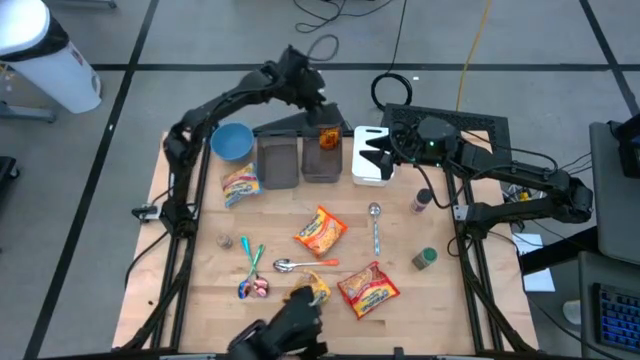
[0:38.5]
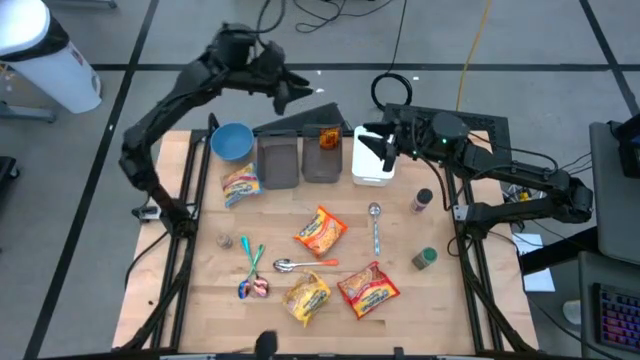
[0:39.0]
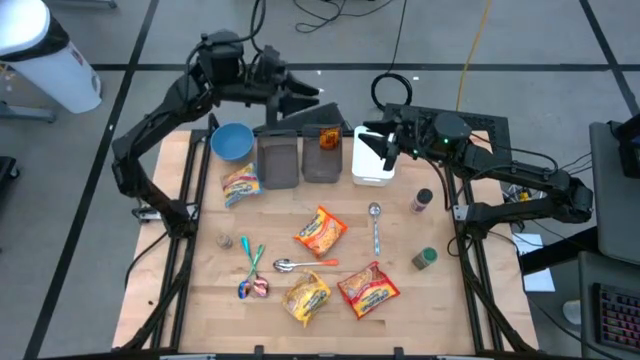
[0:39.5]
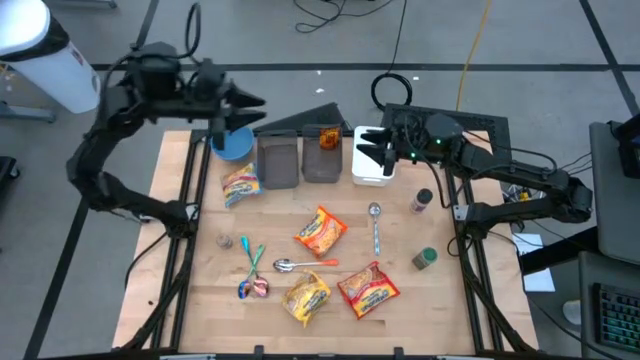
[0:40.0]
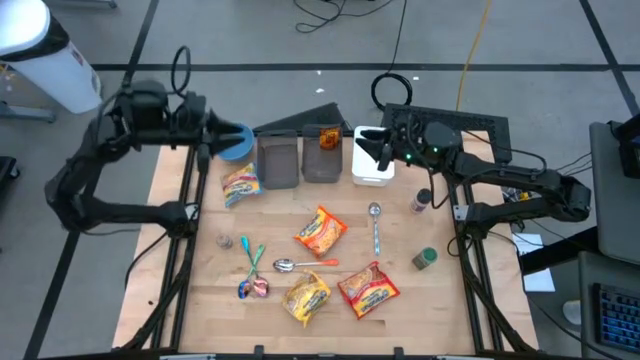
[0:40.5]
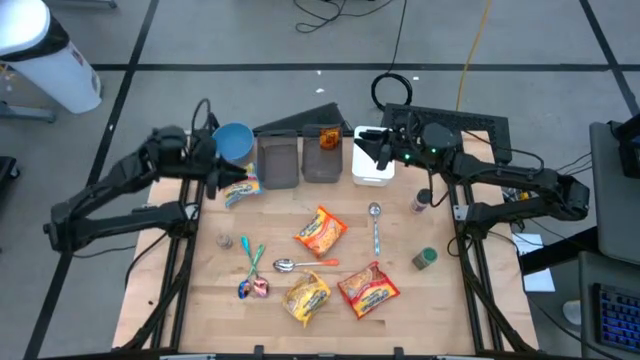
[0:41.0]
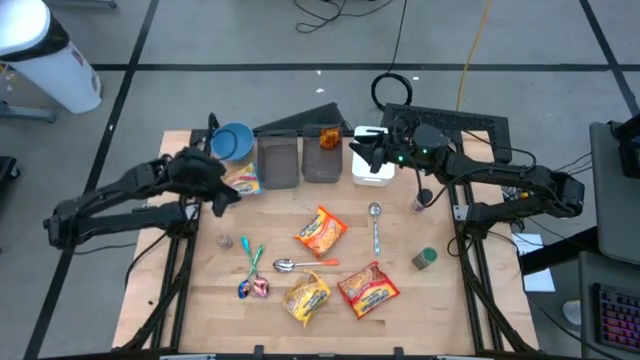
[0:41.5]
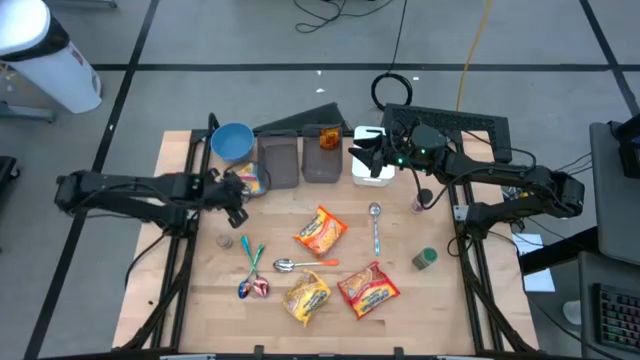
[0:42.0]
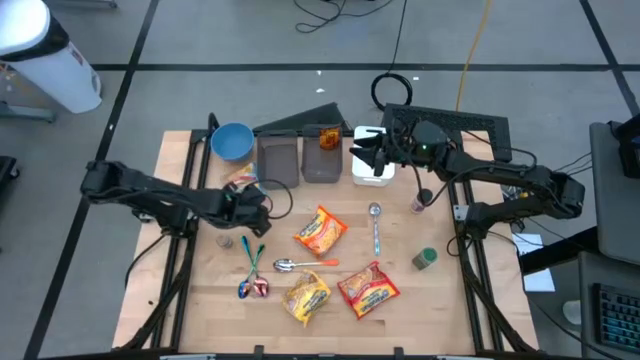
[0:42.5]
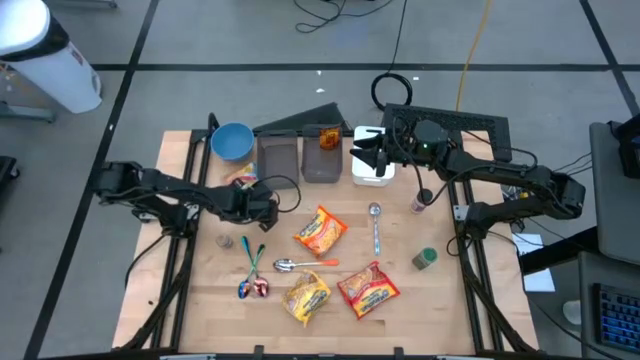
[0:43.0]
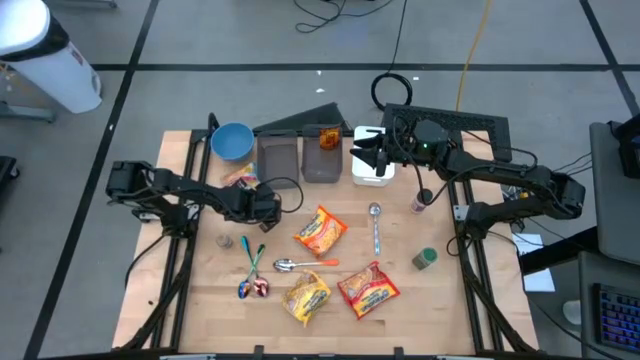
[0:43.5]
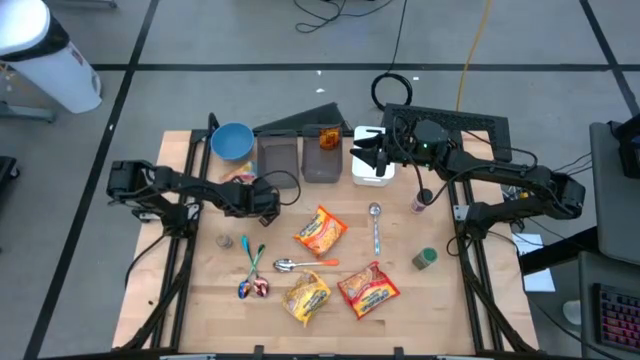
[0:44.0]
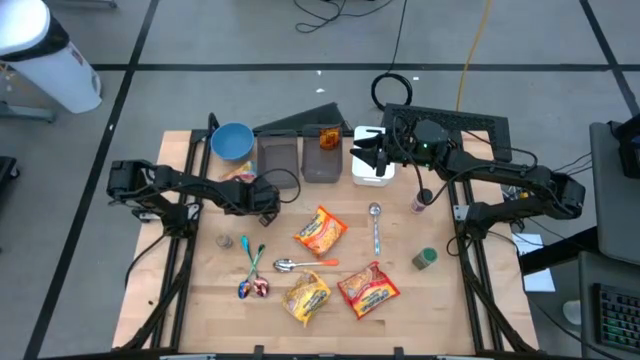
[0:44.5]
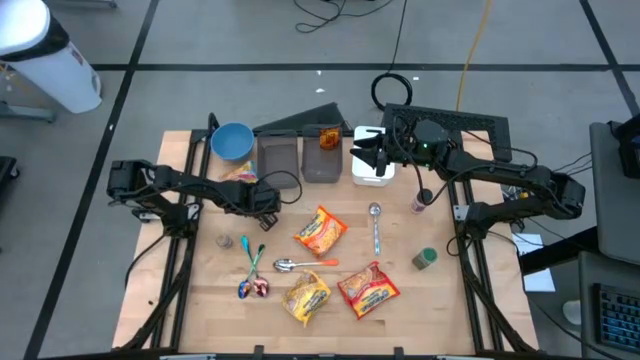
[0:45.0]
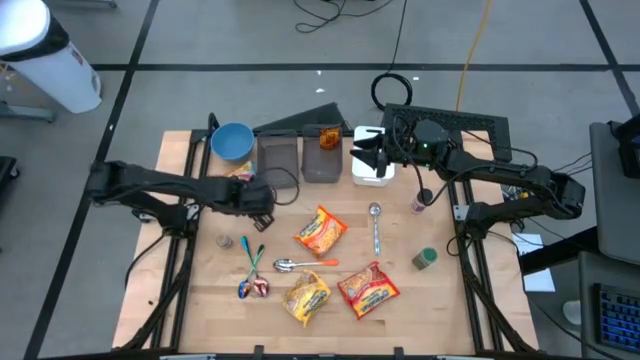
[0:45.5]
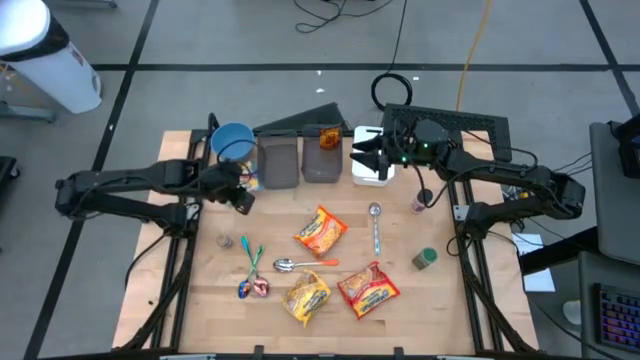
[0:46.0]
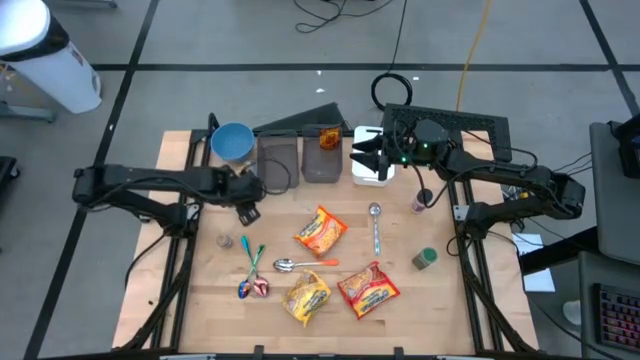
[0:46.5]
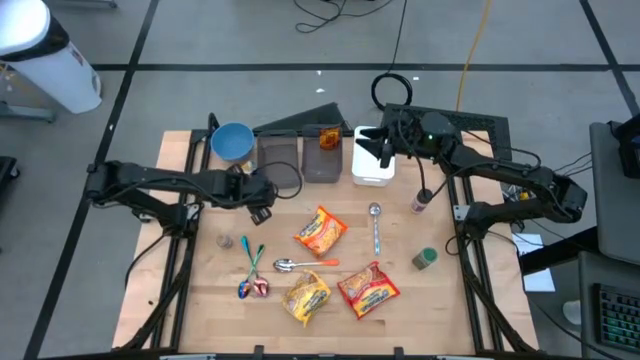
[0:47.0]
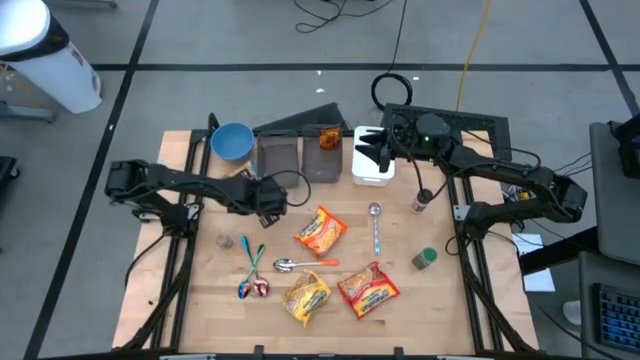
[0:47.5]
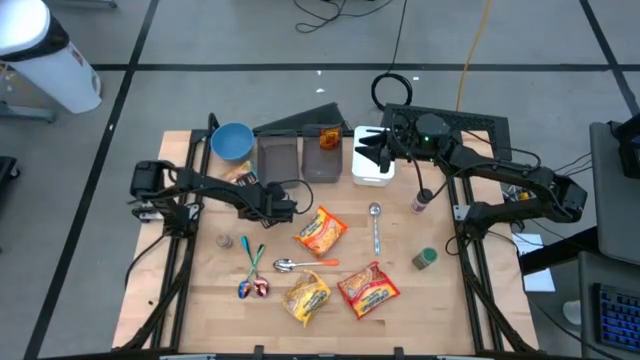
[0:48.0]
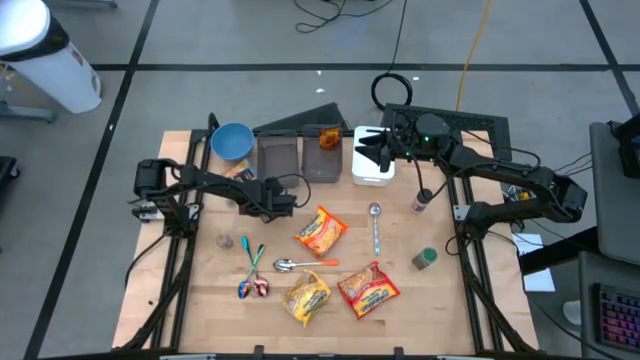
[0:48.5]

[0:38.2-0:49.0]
Task: Pick & Place Food Item
Put the blue noodle pack into the left black bin

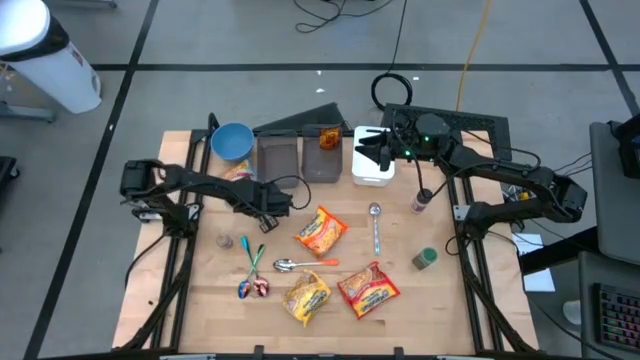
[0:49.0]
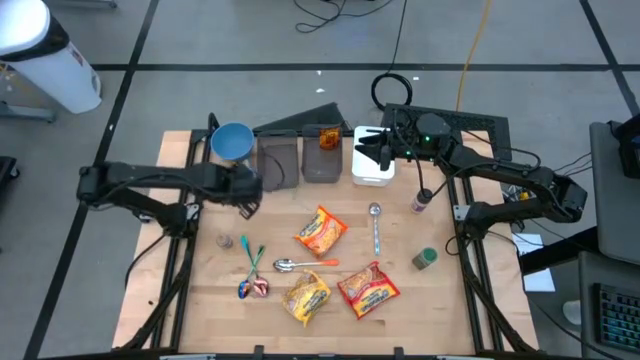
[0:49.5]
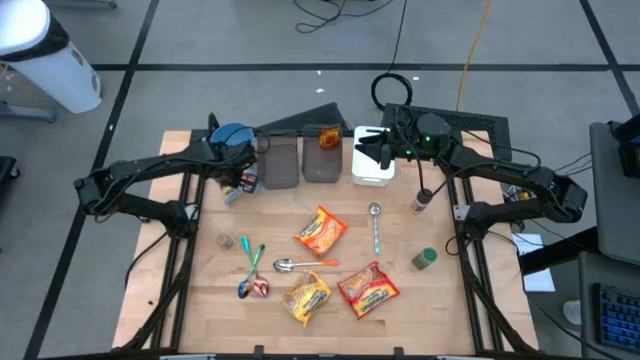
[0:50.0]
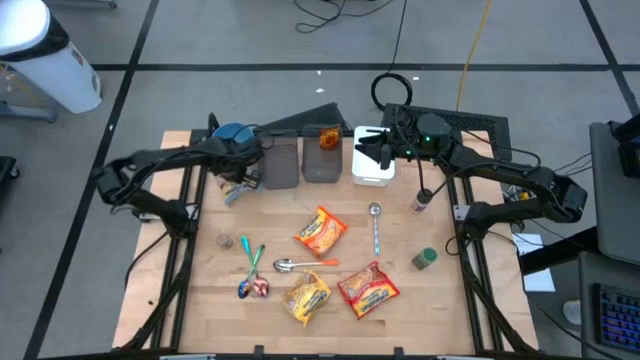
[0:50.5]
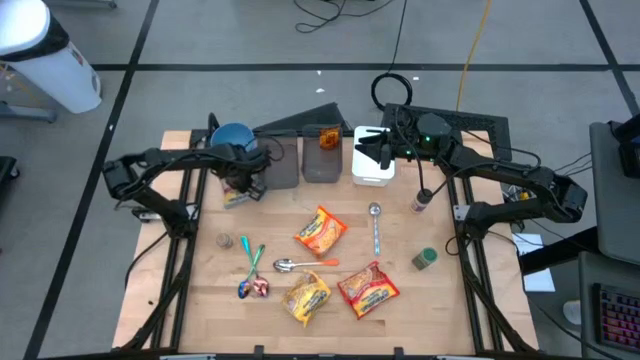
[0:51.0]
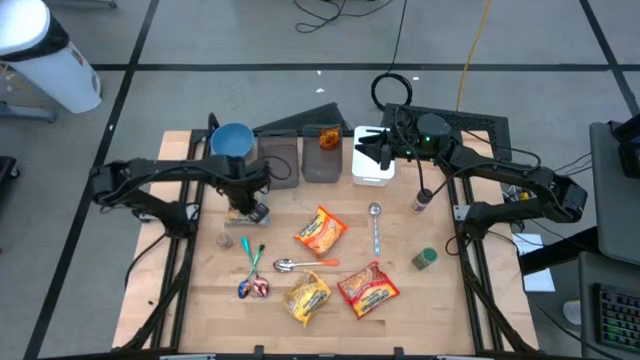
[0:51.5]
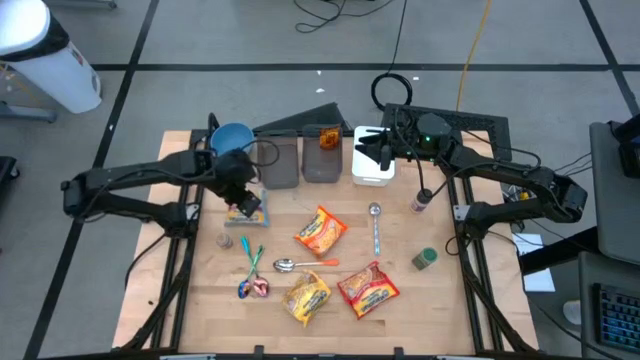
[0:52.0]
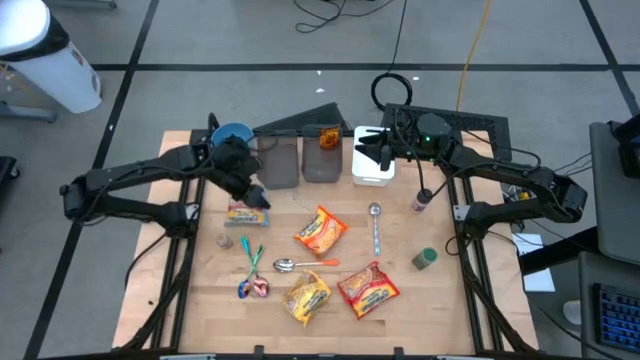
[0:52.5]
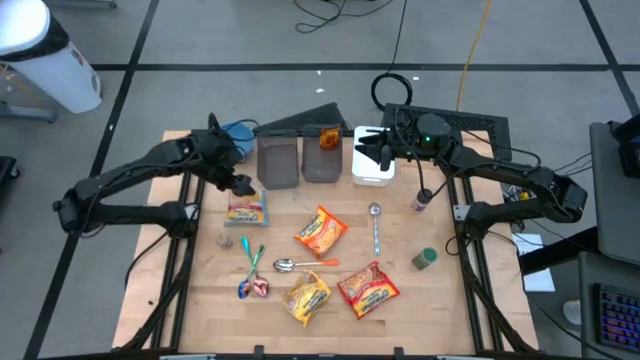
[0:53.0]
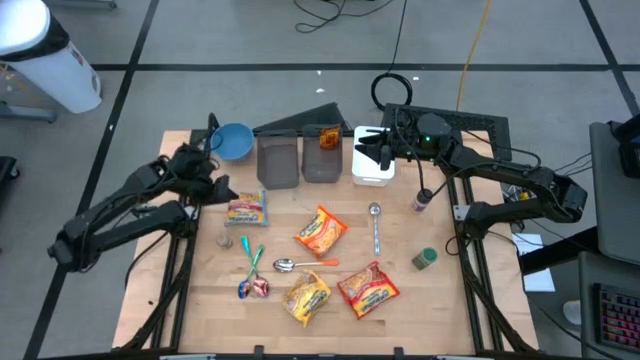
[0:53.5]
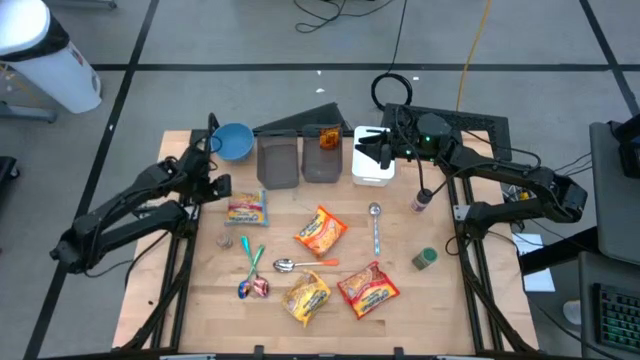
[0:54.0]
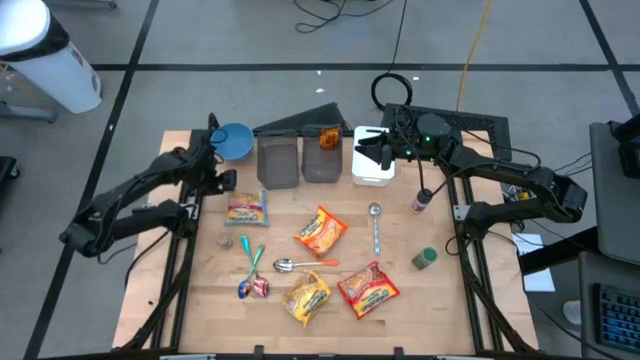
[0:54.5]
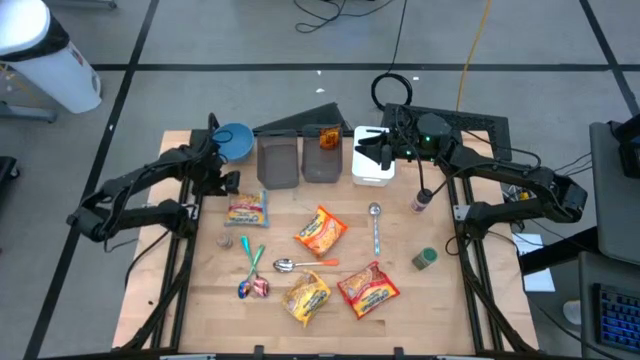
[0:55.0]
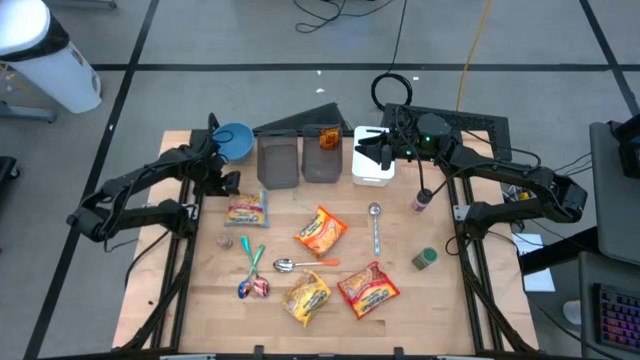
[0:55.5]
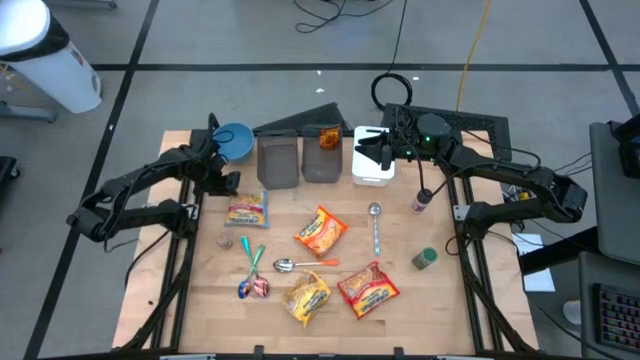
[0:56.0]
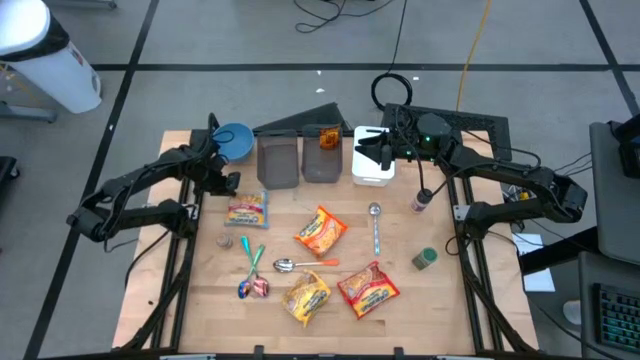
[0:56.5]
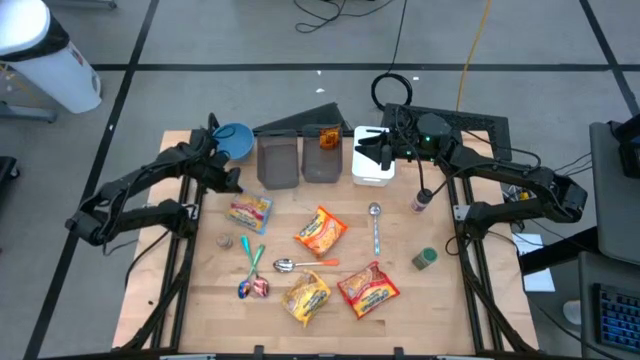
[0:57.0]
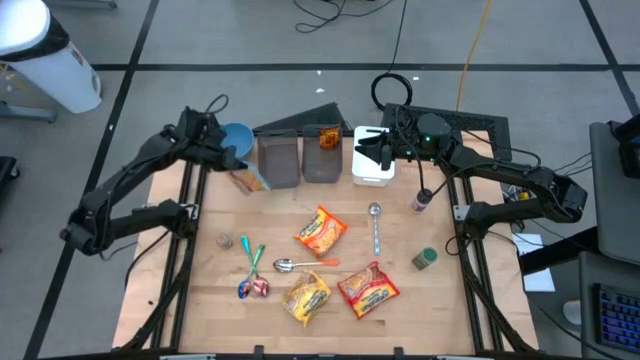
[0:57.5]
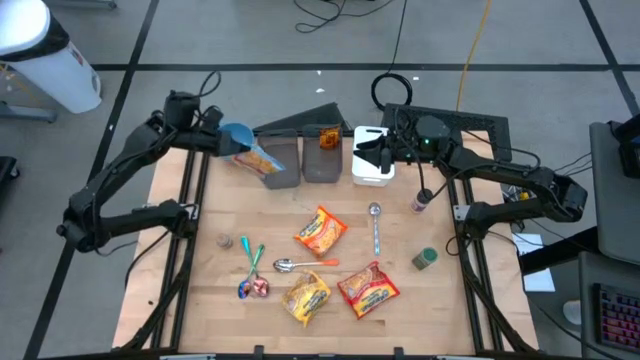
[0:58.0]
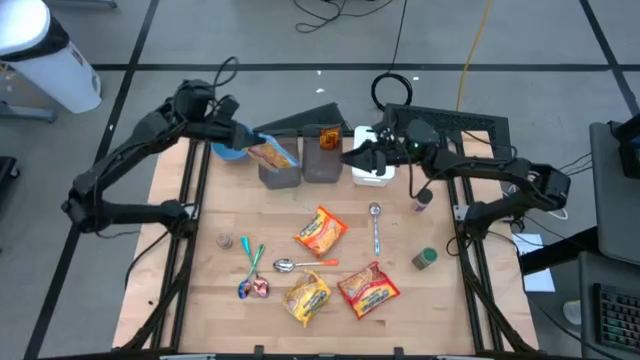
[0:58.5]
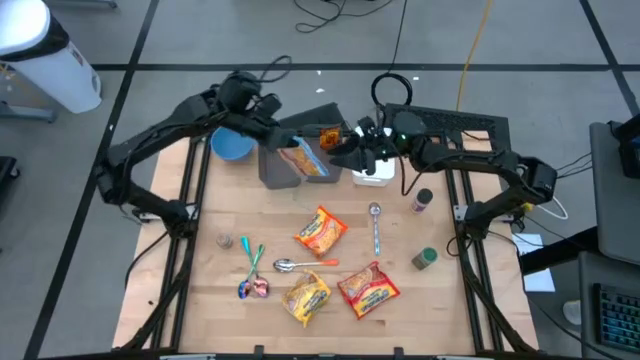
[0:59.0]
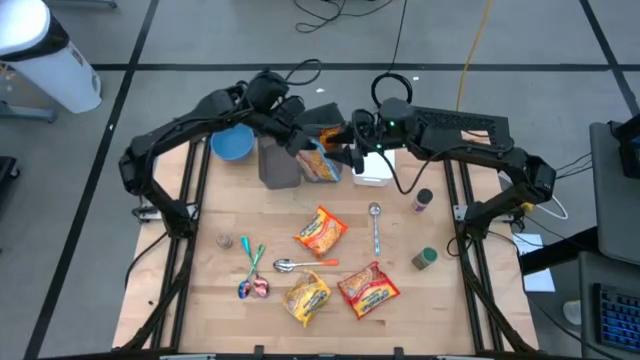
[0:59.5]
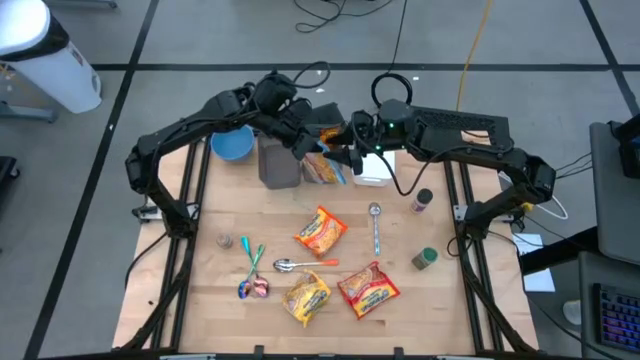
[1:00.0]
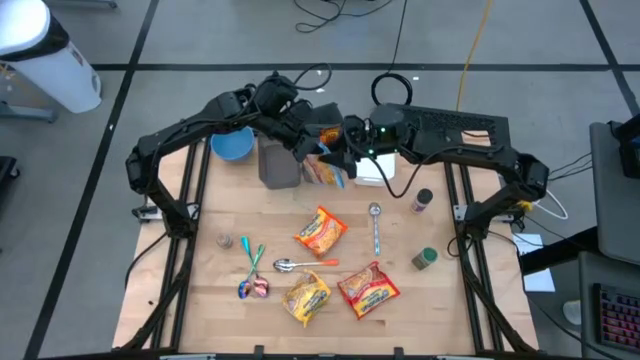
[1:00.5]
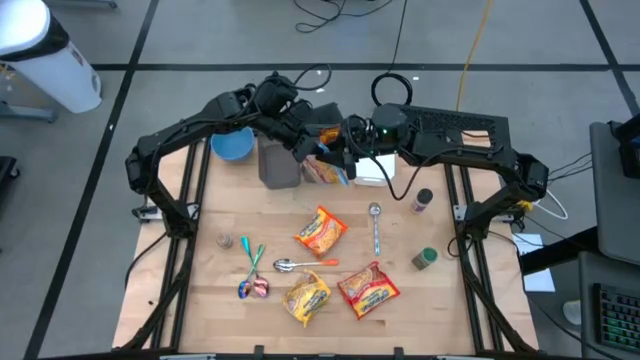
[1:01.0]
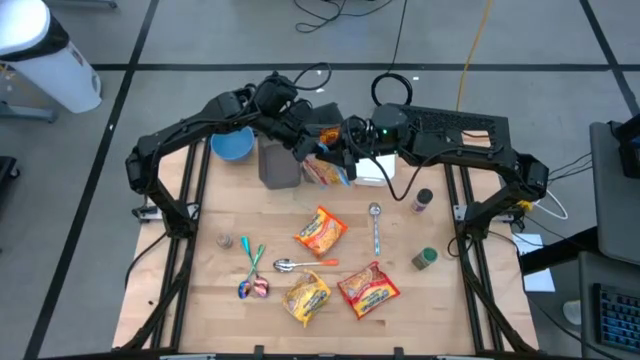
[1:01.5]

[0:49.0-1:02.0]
Put the blue noodle pack into the left black bin
